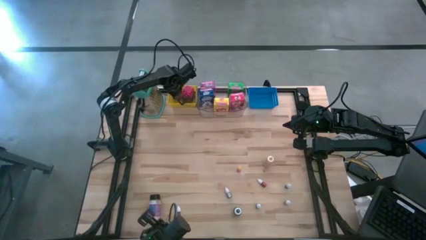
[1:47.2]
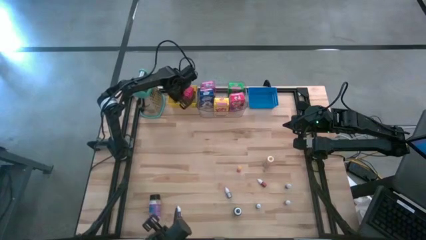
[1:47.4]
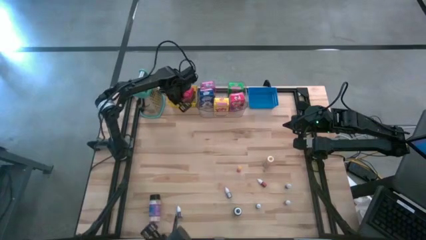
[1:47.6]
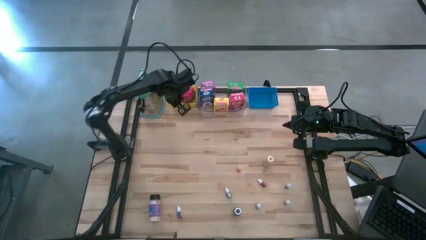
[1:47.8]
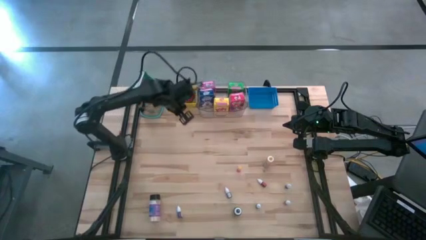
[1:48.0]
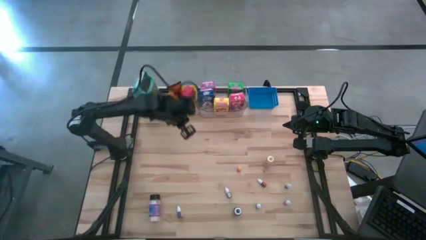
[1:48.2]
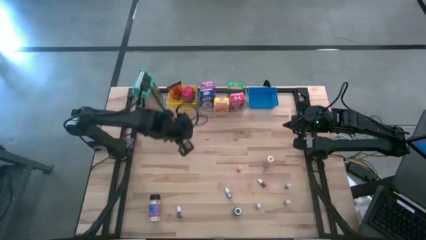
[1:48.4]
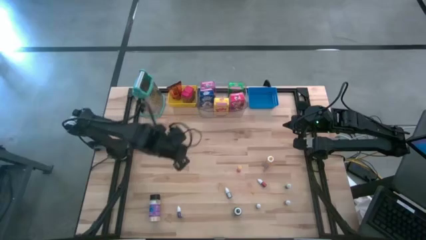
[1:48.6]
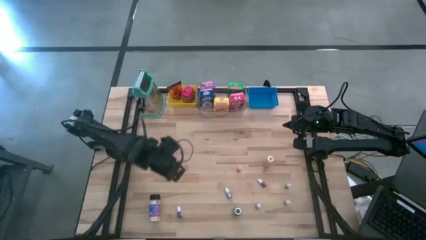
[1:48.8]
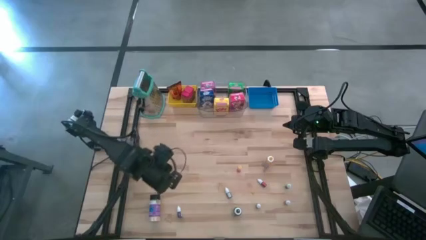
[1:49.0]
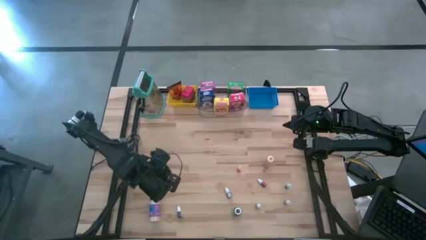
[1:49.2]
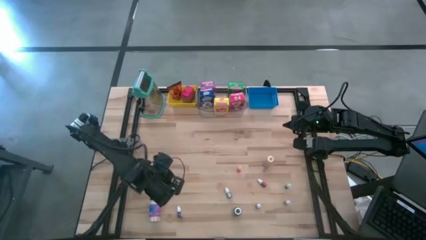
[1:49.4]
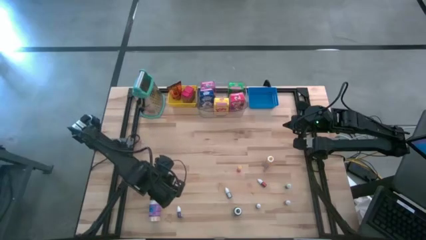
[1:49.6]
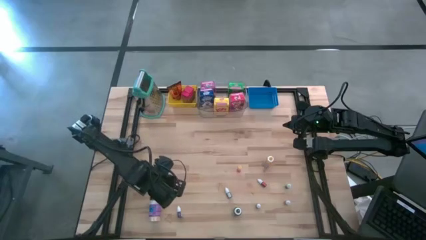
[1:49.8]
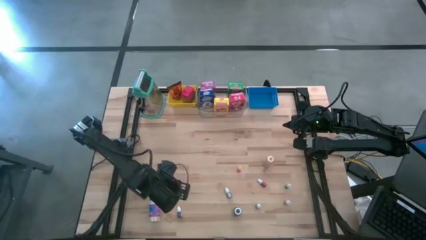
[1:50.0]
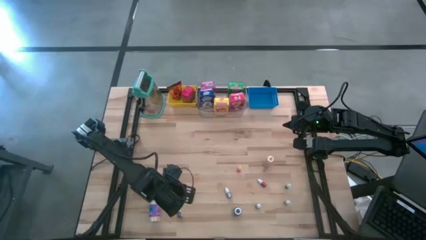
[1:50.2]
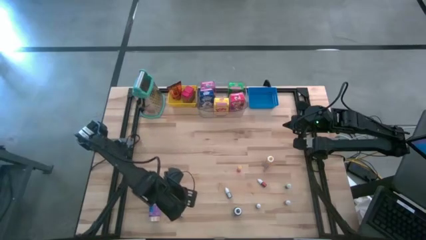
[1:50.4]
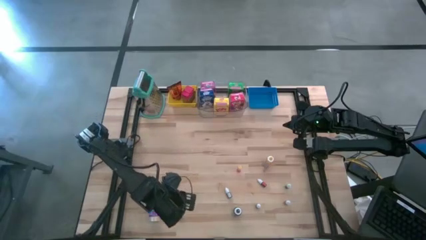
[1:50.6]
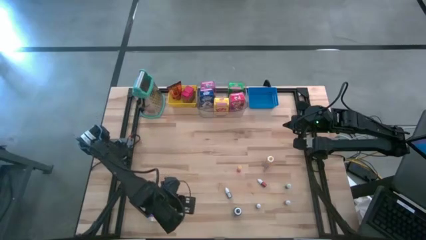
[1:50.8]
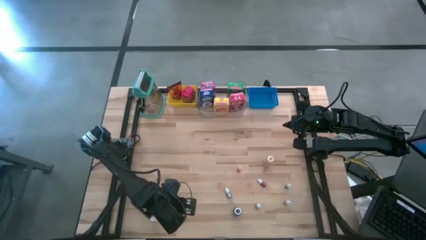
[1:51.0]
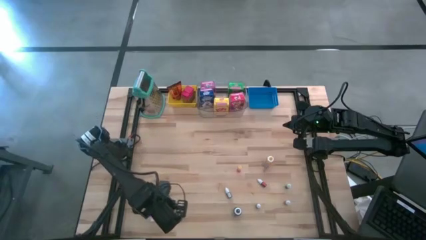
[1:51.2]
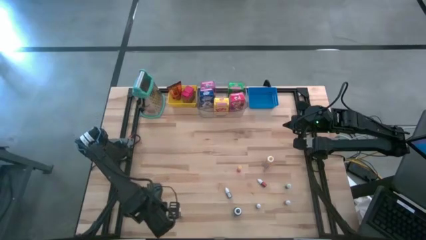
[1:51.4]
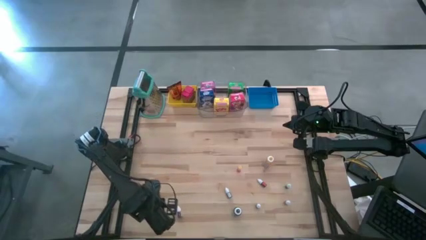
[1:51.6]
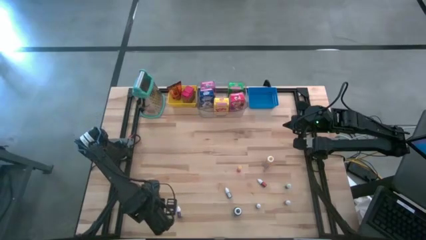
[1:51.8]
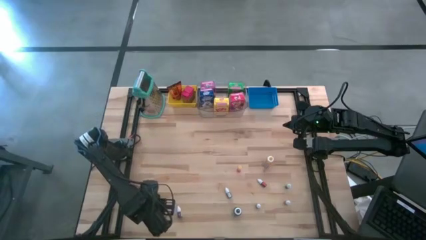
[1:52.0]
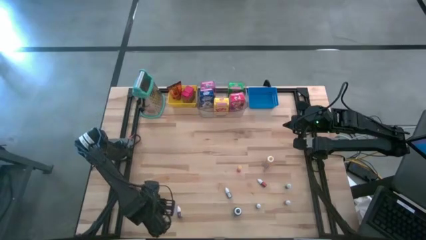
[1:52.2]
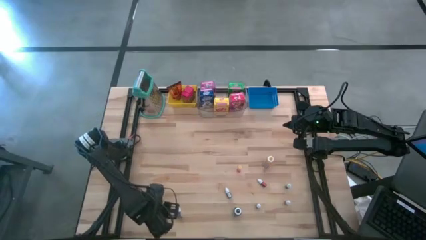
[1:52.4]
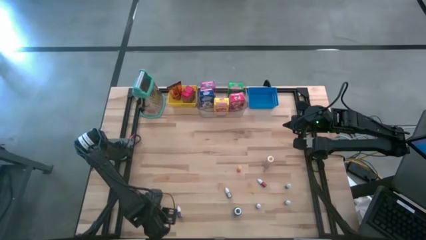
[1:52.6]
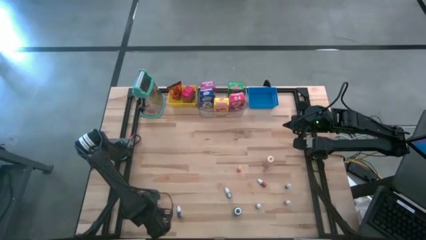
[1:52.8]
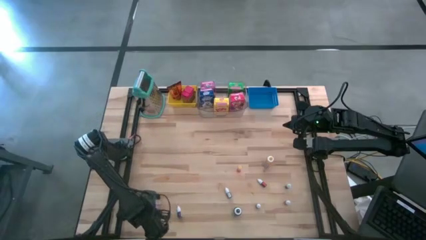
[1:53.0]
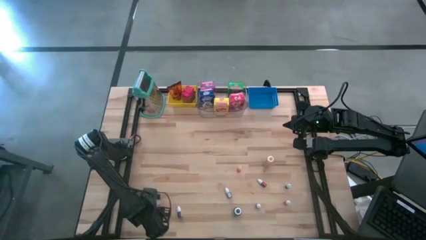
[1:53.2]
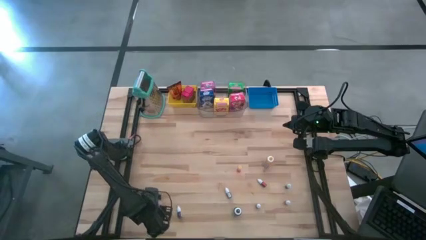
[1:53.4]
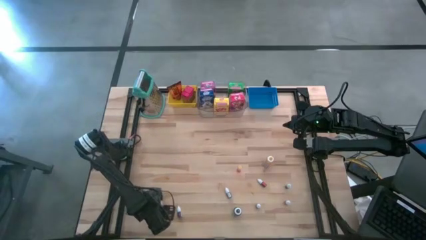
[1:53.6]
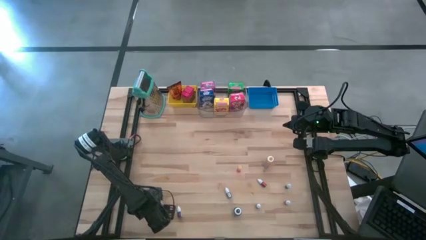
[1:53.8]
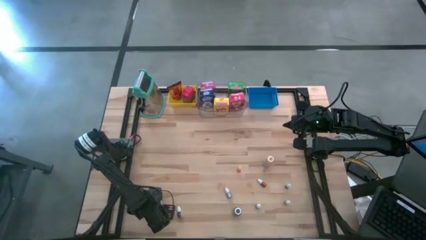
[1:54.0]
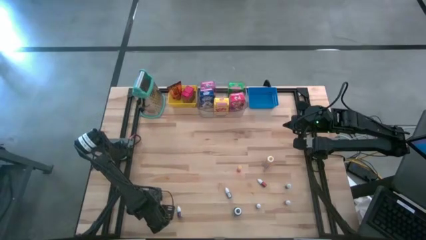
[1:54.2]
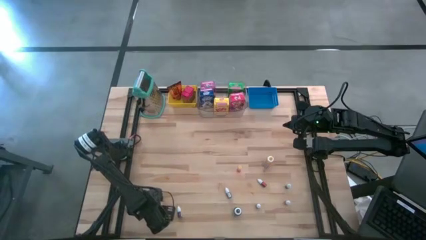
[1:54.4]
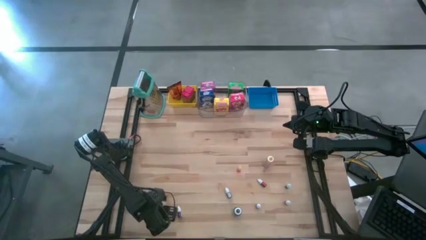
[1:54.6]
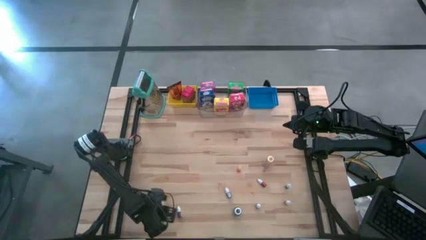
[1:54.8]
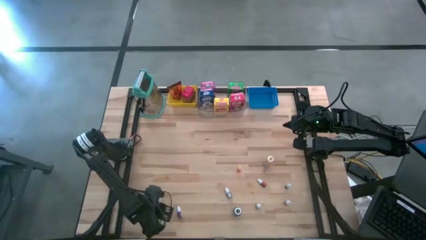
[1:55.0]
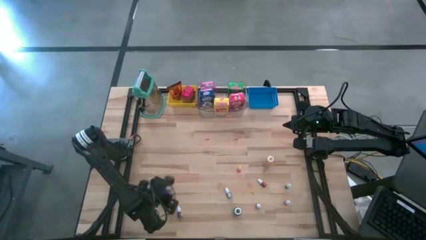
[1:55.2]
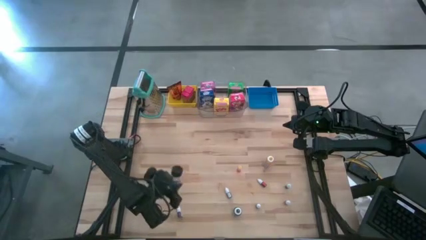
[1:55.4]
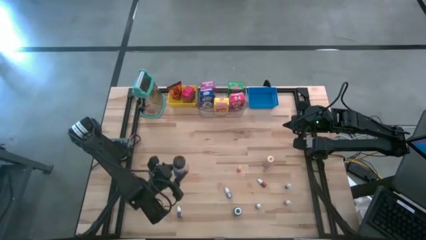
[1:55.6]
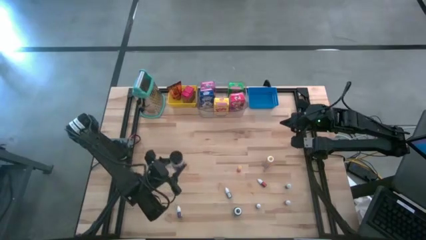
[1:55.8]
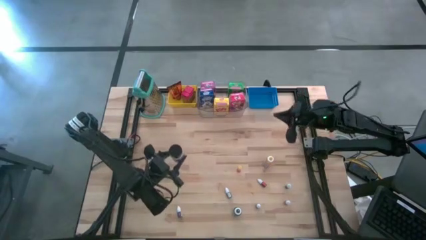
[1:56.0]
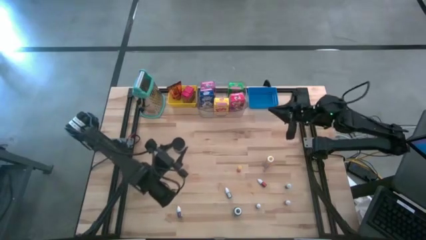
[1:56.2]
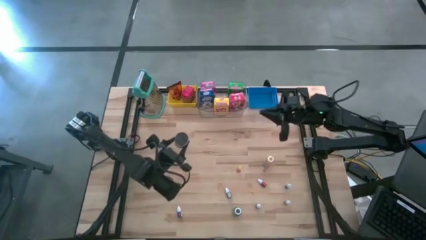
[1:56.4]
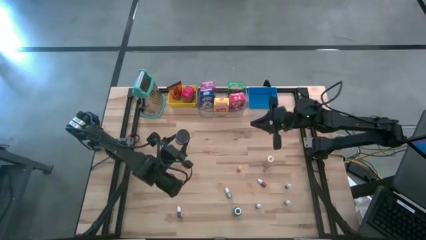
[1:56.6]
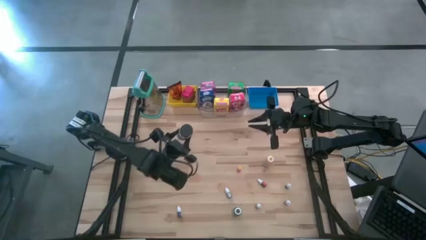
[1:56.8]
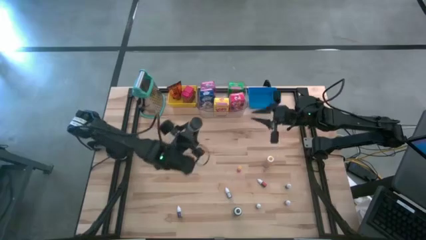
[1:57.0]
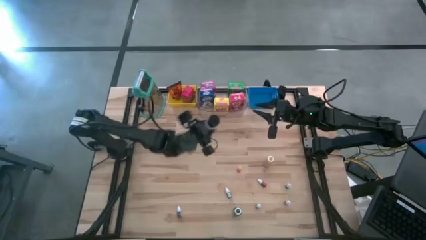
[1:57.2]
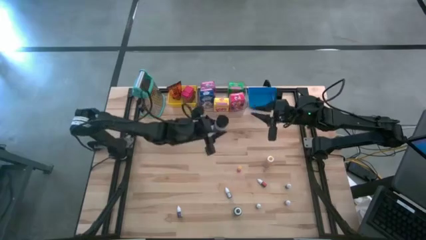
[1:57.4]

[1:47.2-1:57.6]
Task: Pick & Place Kitchen Items
Put the violet seasoning bottle into the yellow bin
